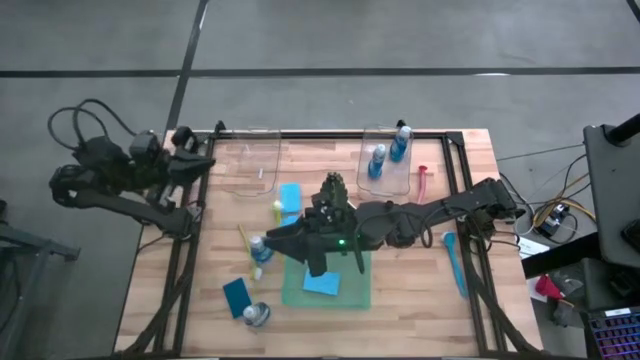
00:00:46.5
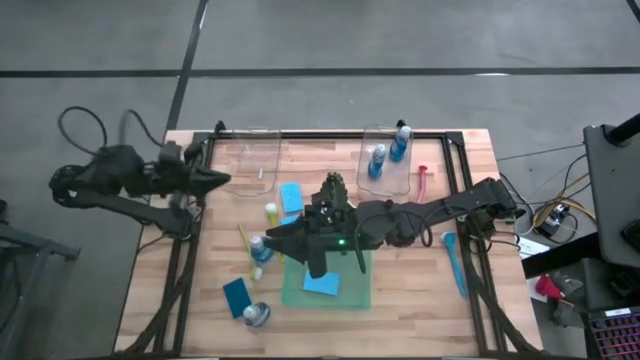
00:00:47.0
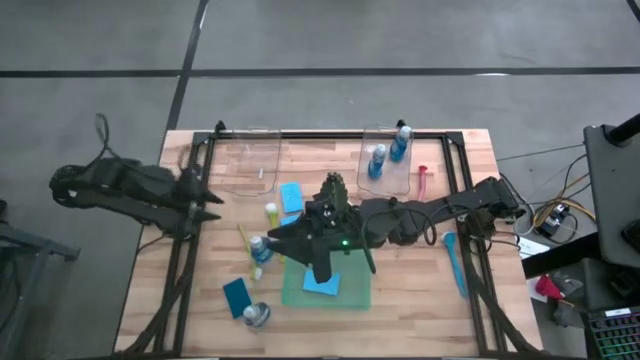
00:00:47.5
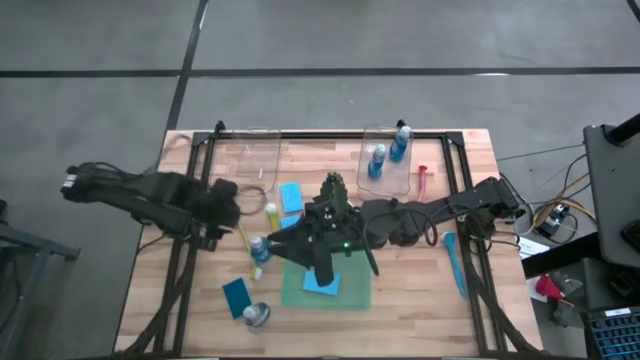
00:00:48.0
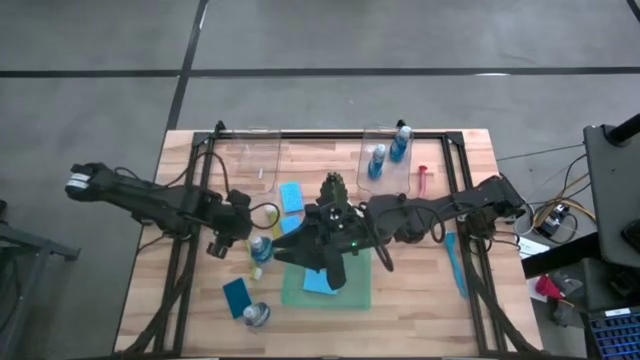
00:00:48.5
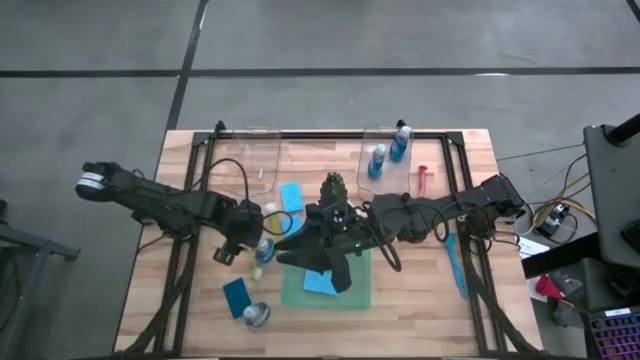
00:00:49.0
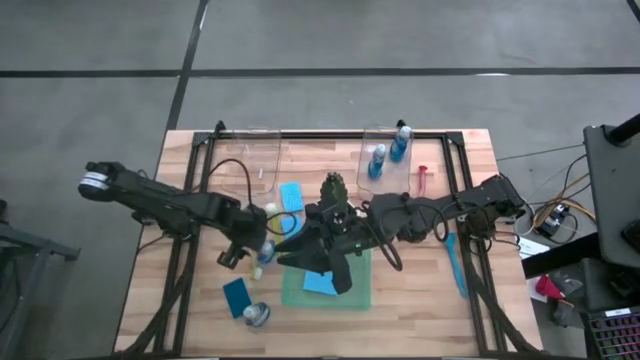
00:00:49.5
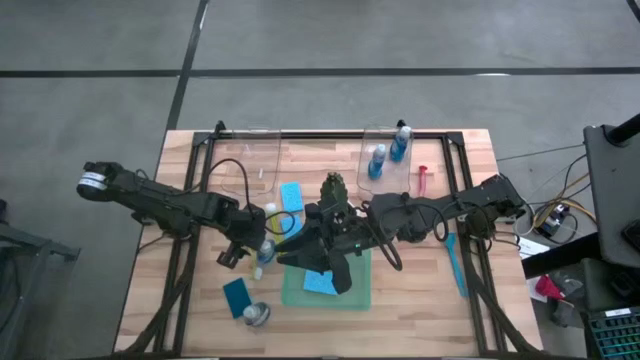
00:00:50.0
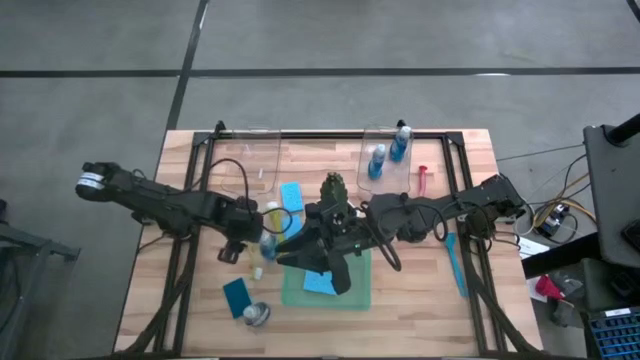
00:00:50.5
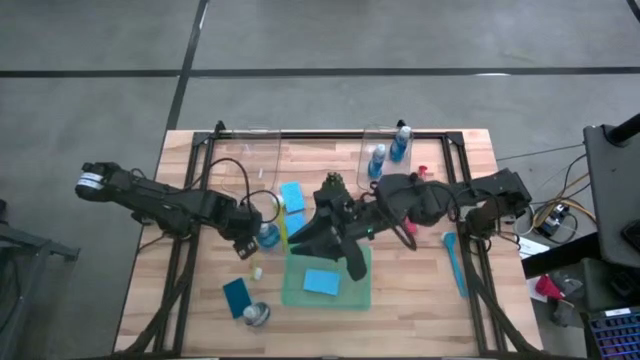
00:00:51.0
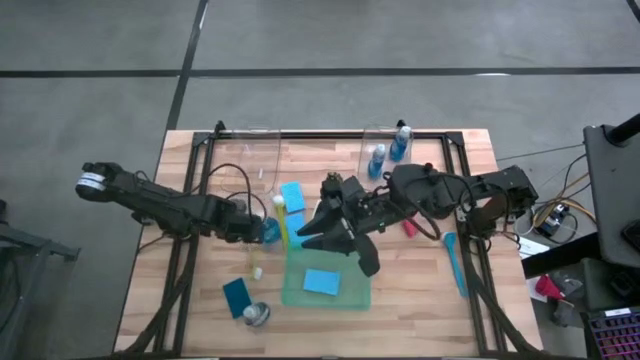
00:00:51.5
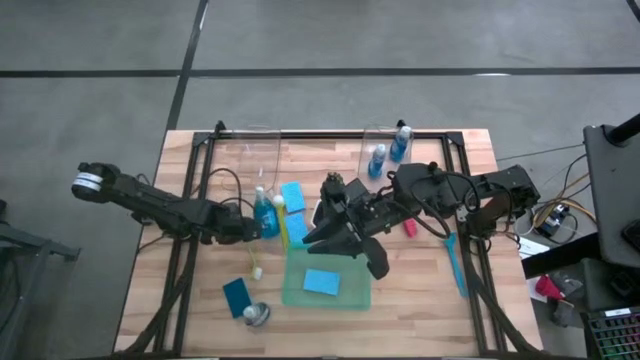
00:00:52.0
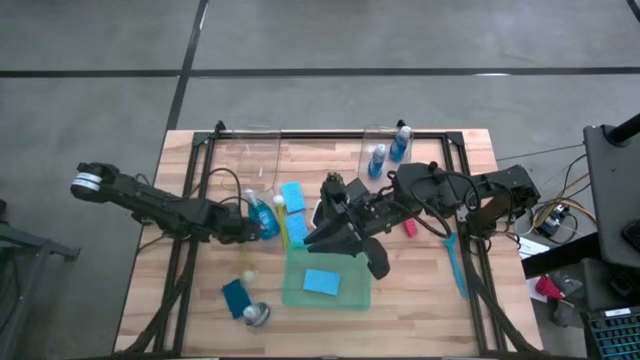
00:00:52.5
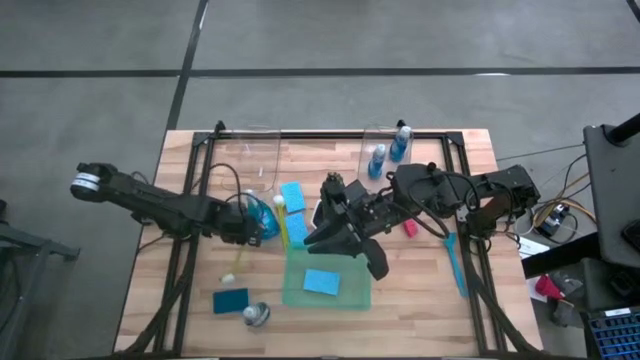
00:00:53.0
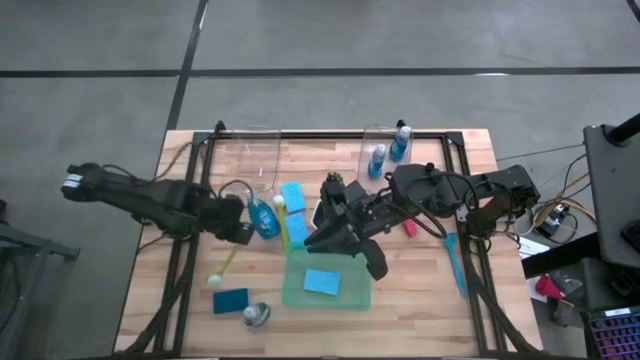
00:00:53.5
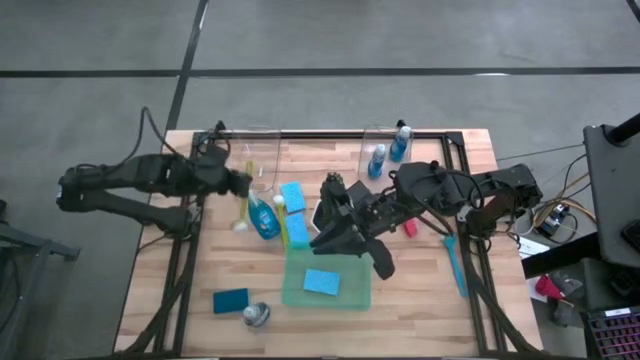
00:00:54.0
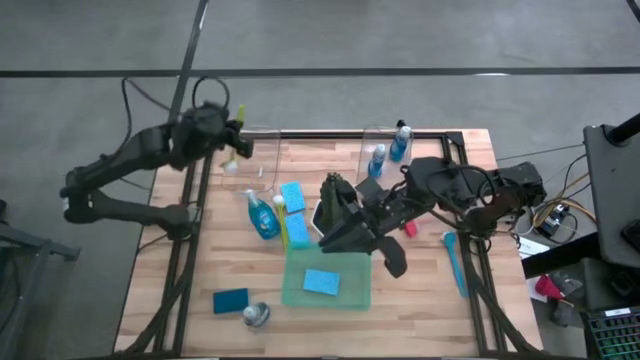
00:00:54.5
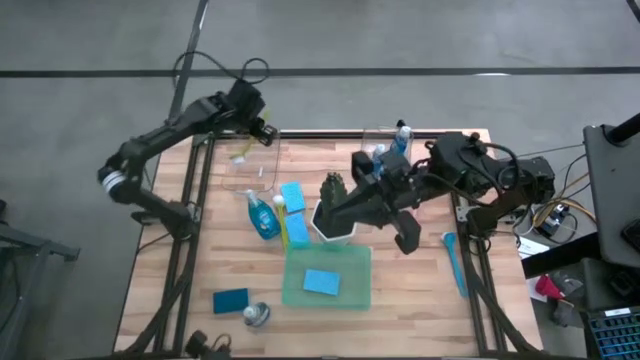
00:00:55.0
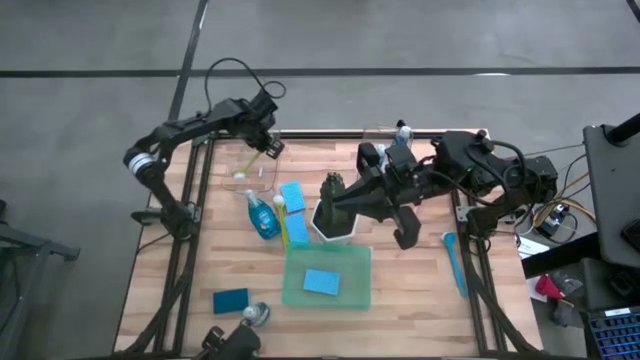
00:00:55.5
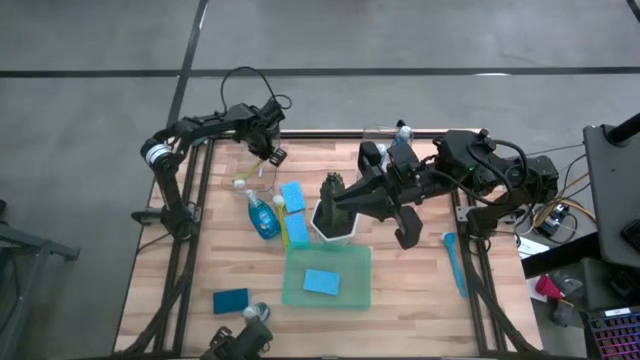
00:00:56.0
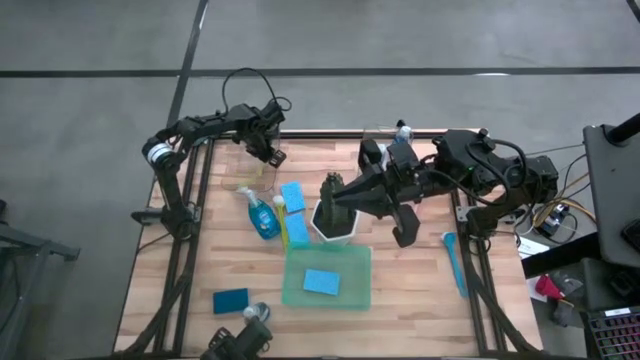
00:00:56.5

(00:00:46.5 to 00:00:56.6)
Task: Pick & Place Kitchen Sink Supplies
Put the left green dish brush into the left transparent bin

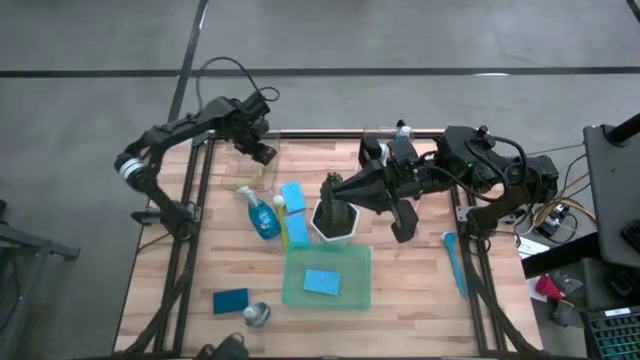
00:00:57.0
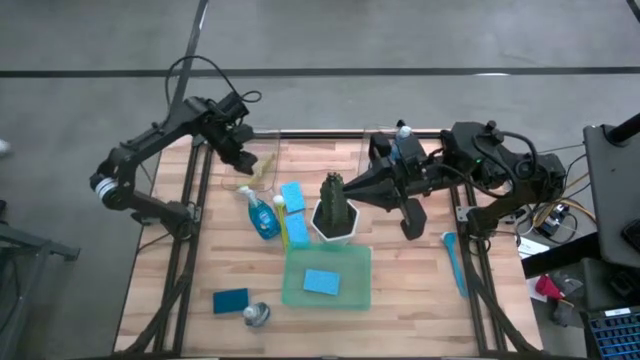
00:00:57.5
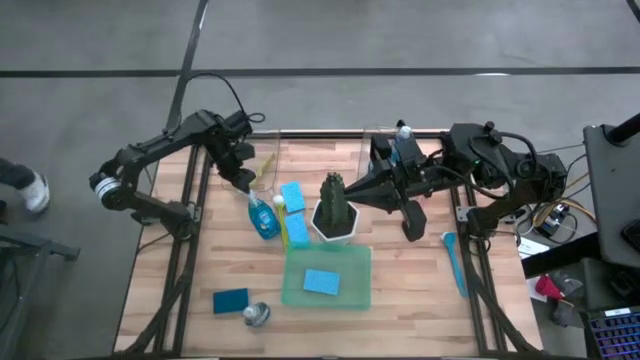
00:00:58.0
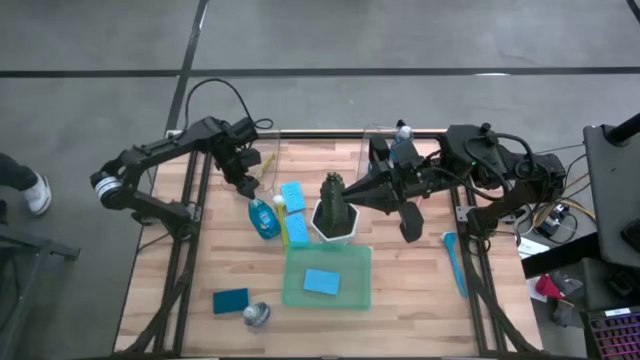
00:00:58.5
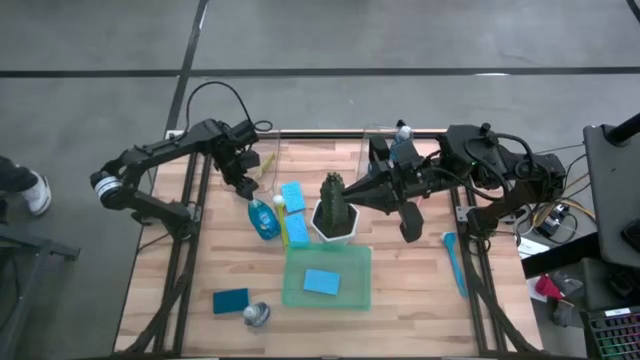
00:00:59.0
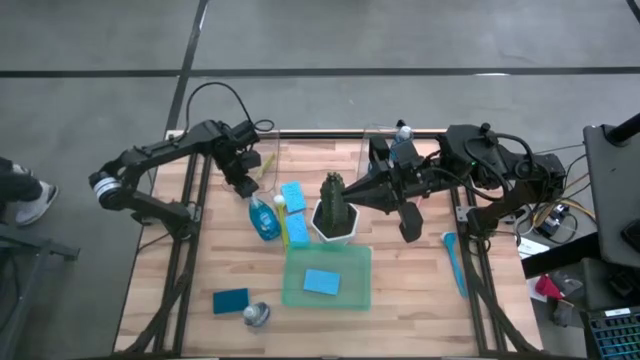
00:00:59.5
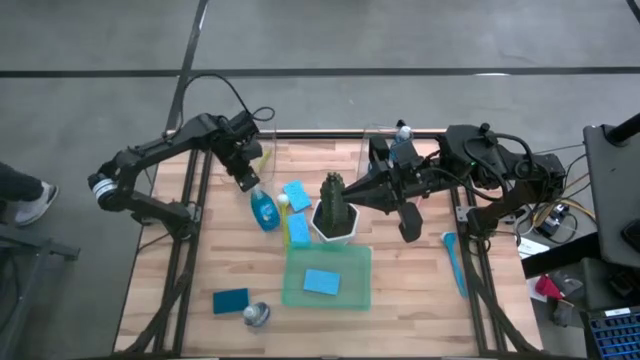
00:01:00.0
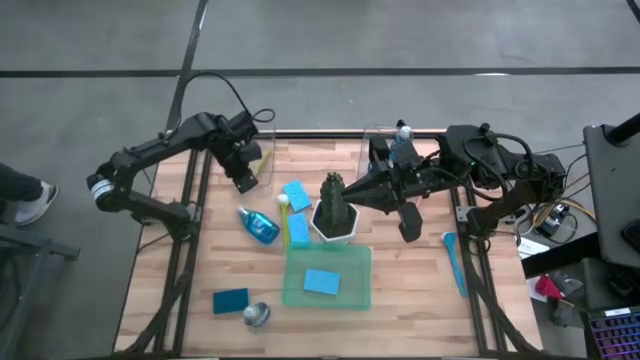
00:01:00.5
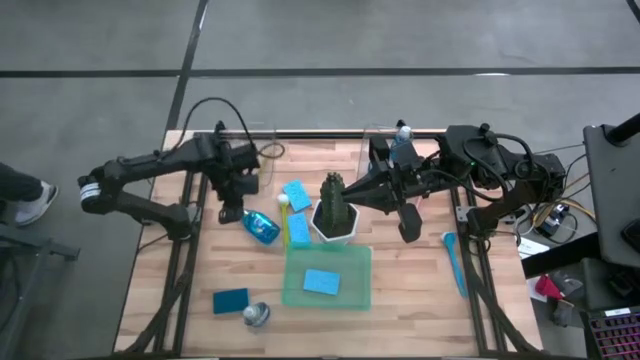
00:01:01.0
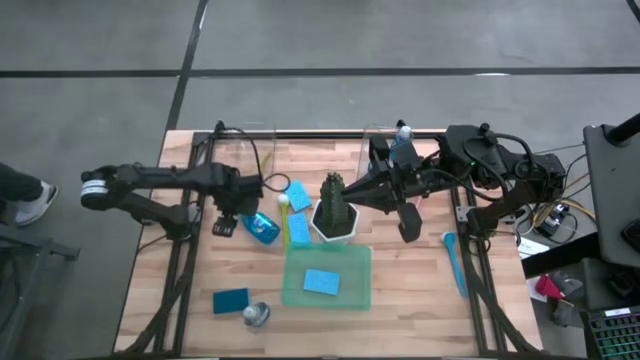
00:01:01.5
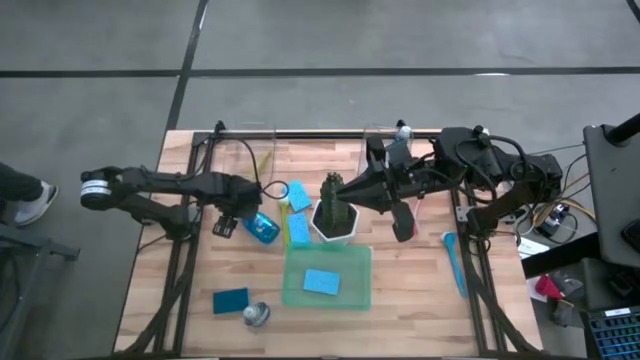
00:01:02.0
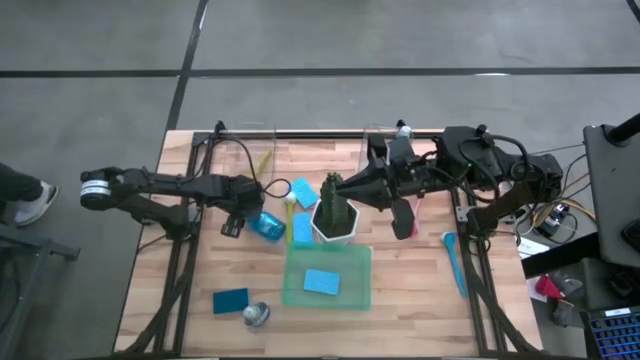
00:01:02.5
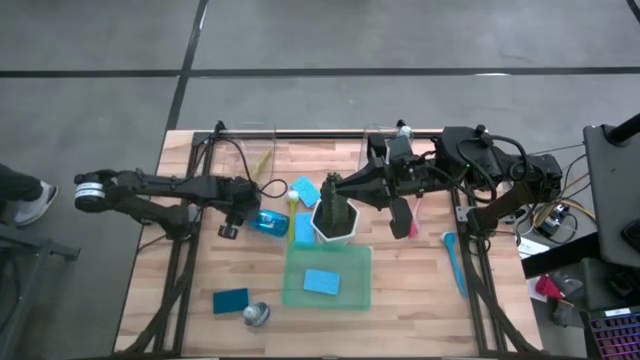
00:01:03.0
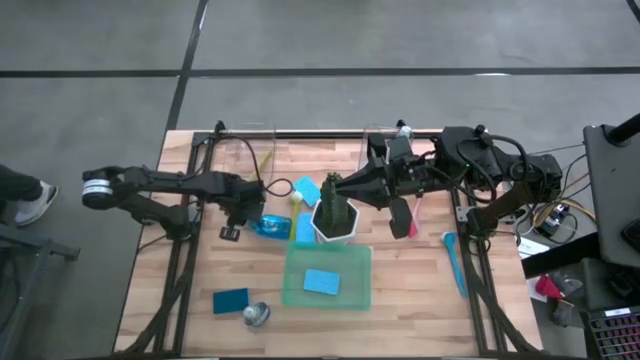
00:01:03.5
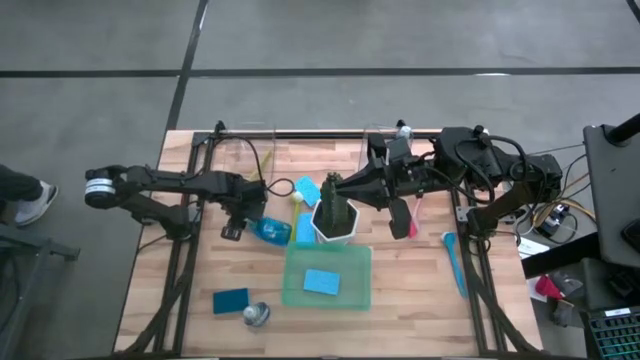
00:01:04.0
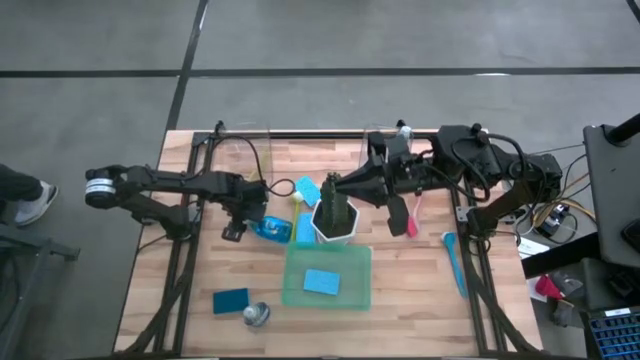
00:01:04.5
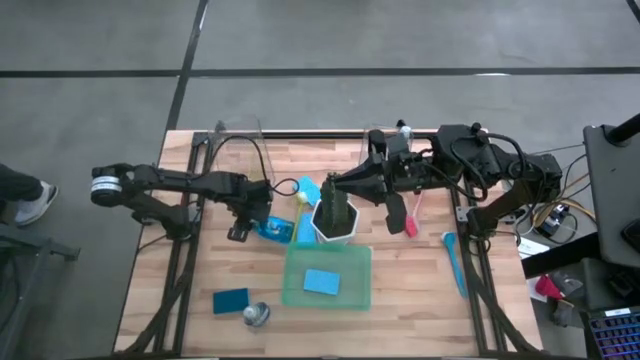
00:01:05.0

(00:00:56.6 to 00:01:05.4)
Put the dish soap into the right transparent bin

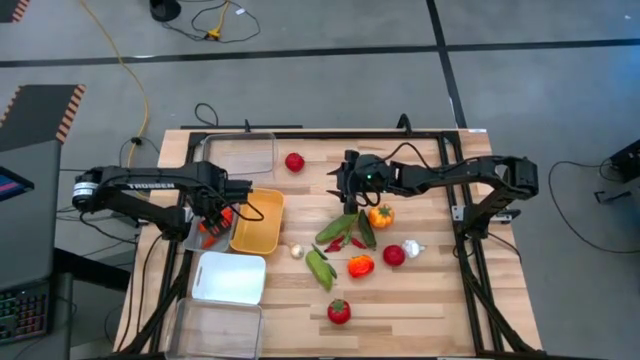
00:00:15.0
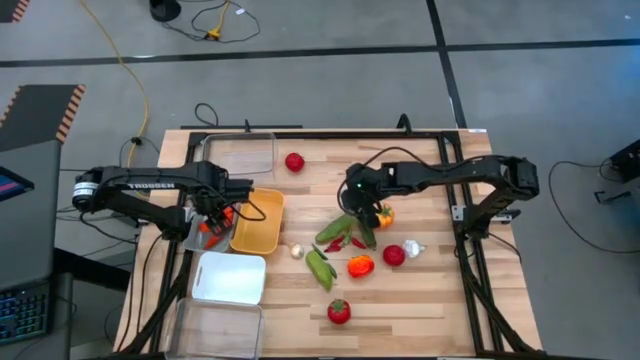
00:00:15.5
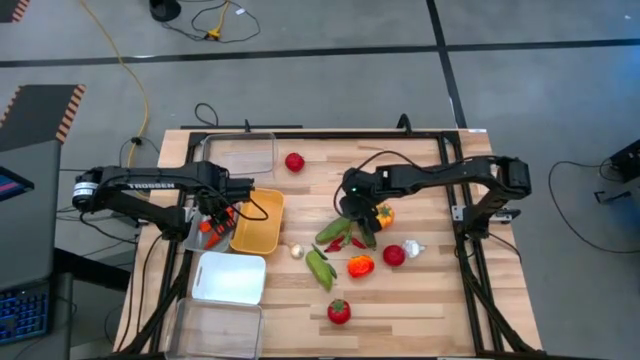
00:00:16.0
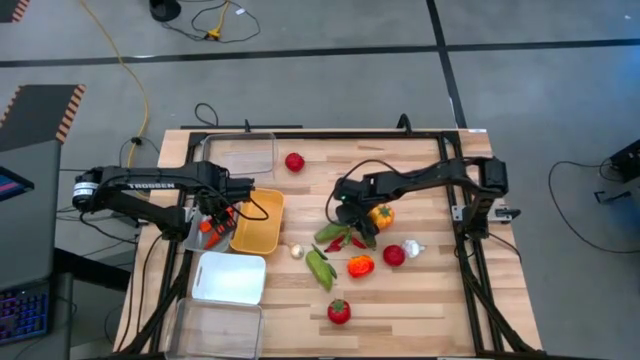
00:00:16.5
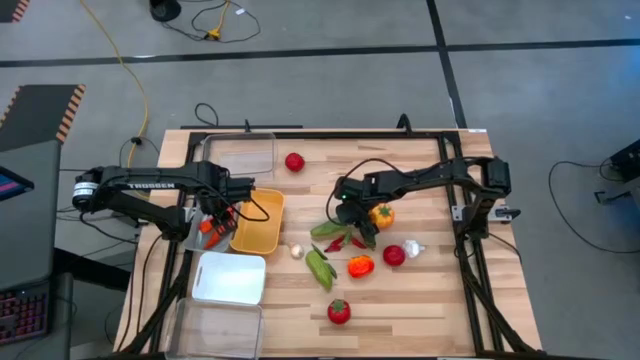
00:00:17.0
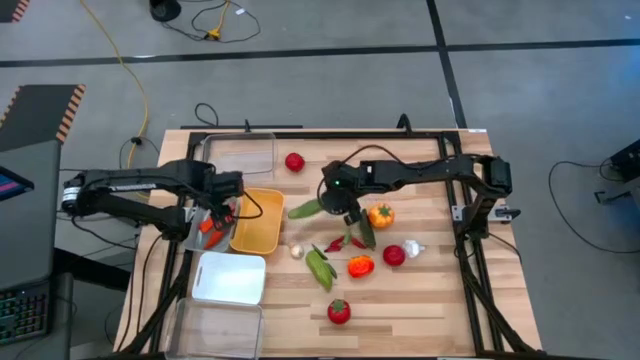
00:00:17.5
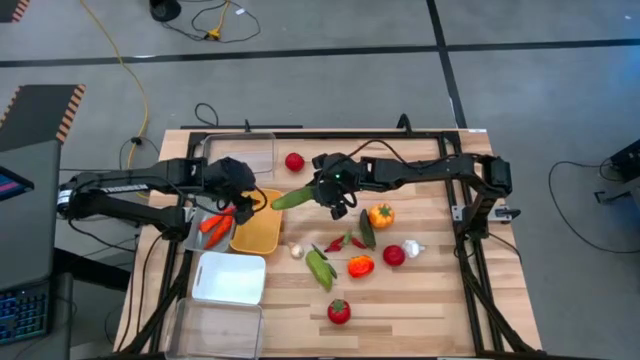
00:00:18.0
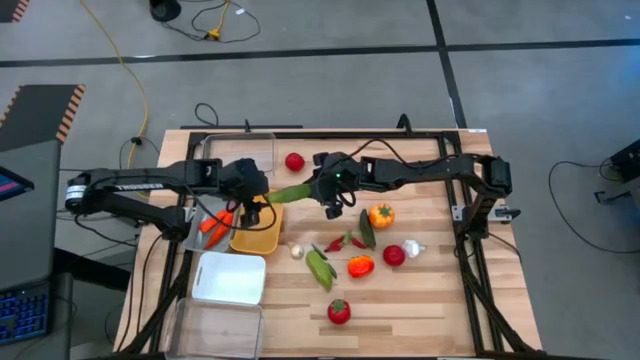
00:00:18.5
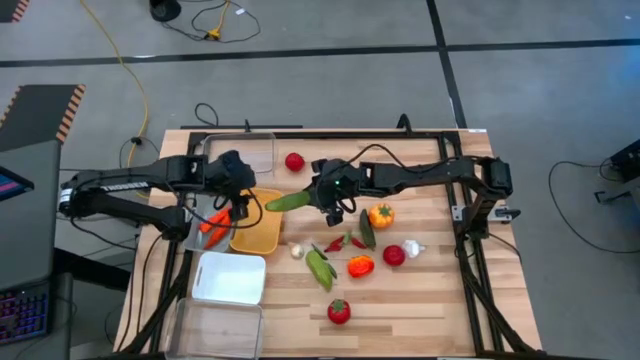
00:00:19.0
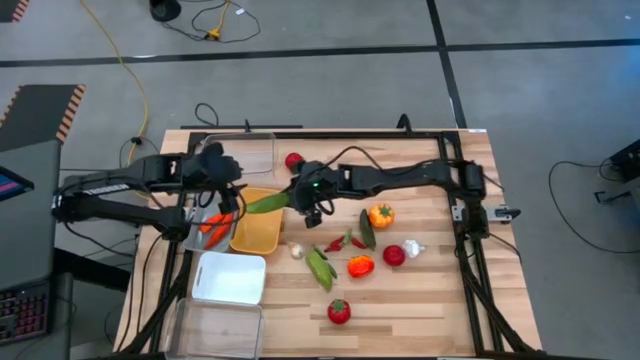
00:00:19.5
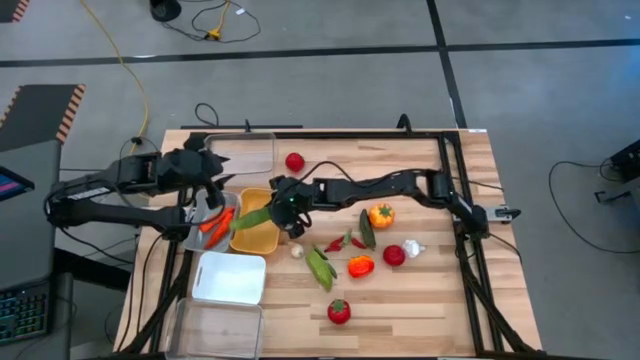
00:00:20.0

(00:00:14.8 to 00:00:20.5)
Task: Sort produce into baskets
Put the top cucumber into the yellow bin
